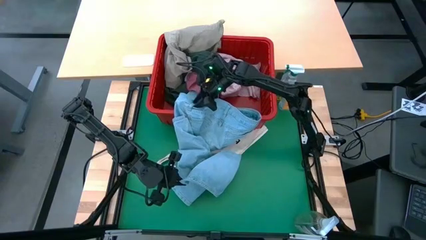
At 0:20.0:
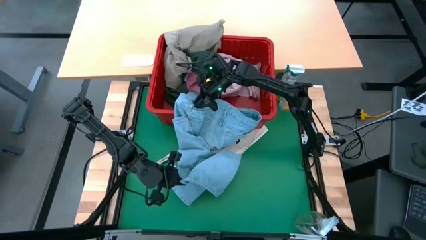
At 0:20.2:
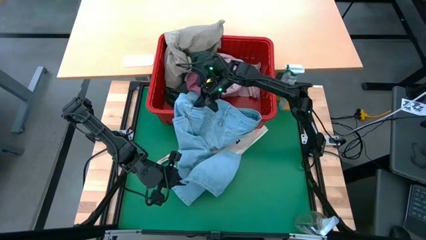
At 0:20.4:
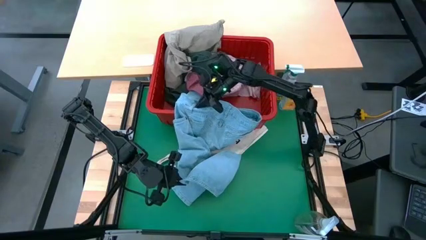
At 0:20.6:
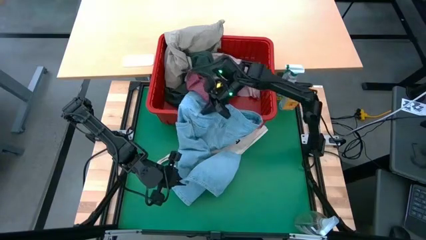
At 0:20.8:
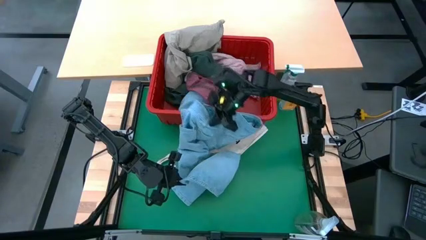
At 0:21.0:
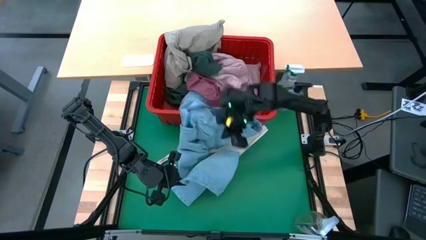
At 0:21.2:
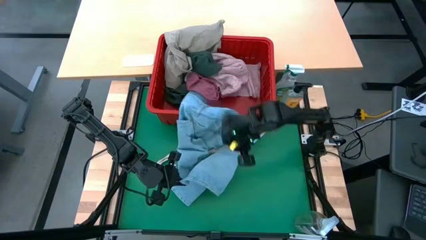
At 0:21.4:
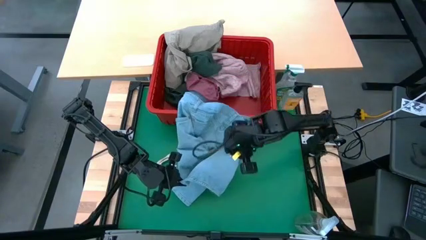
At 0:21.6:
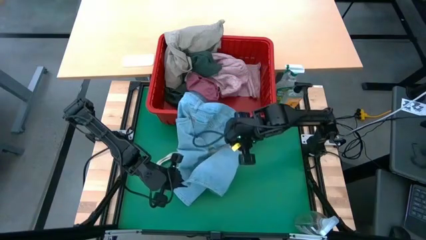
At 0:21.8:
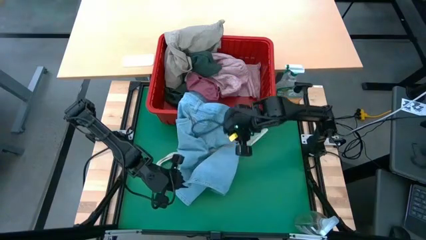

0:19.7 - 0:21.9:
Task: Fold laundry
Fold the blue jeans

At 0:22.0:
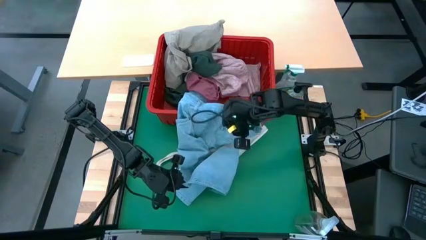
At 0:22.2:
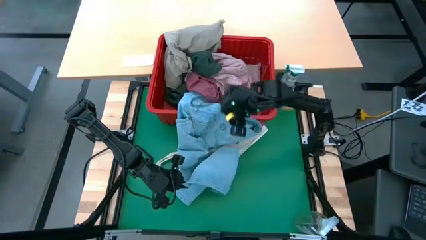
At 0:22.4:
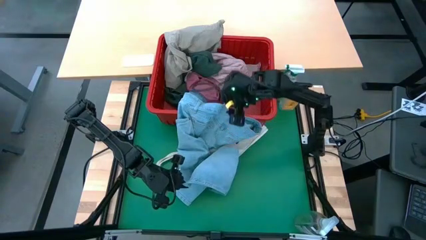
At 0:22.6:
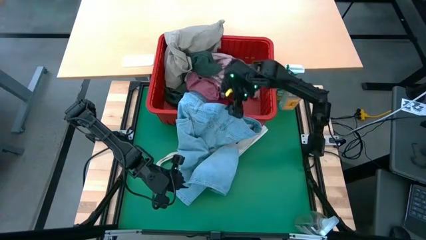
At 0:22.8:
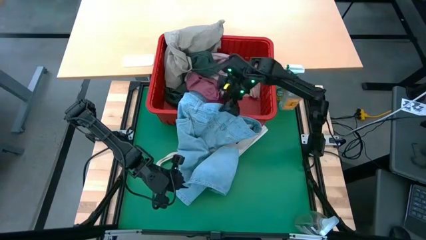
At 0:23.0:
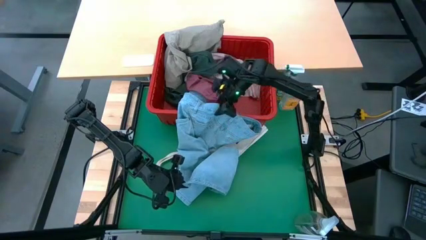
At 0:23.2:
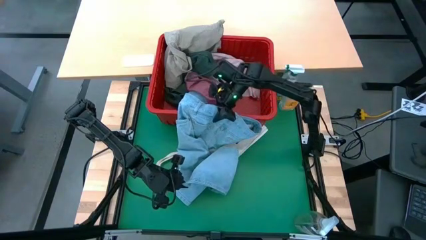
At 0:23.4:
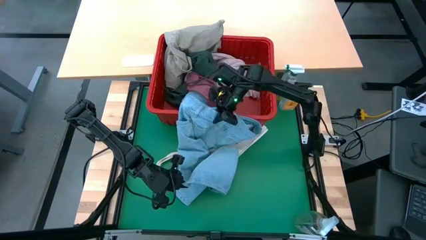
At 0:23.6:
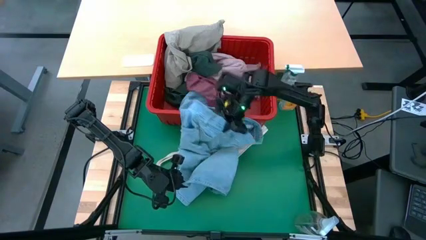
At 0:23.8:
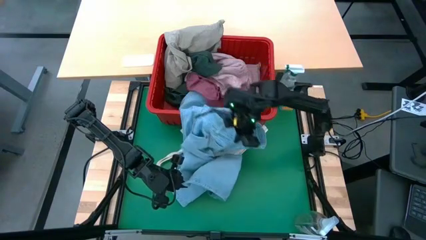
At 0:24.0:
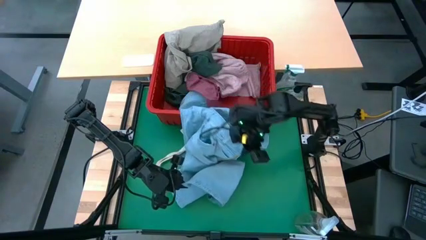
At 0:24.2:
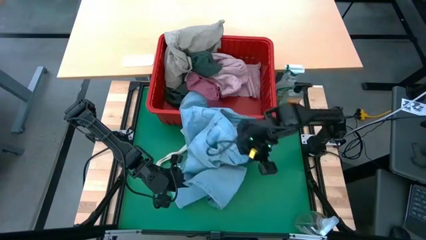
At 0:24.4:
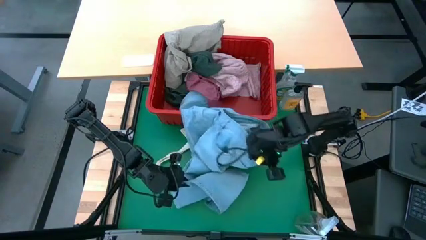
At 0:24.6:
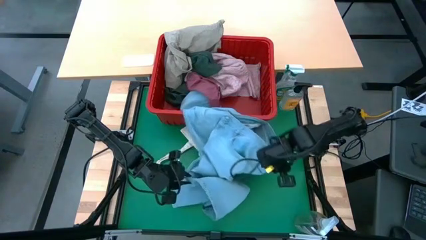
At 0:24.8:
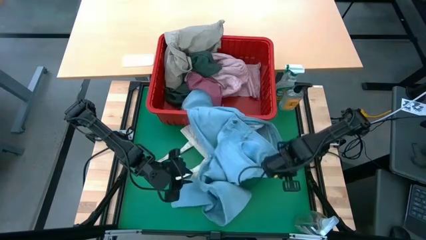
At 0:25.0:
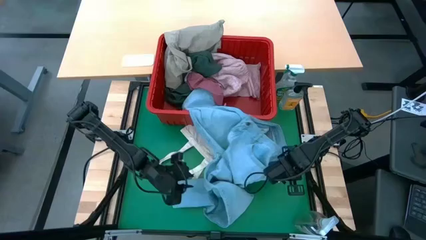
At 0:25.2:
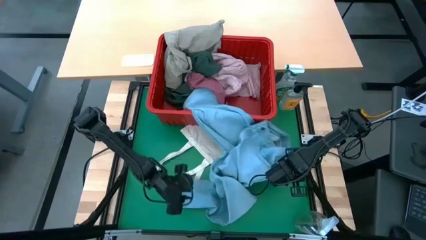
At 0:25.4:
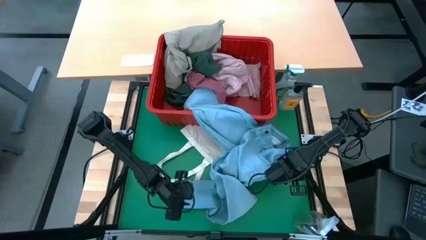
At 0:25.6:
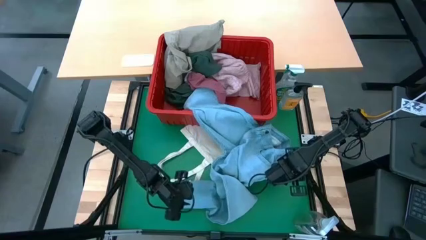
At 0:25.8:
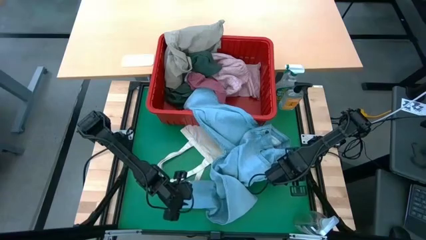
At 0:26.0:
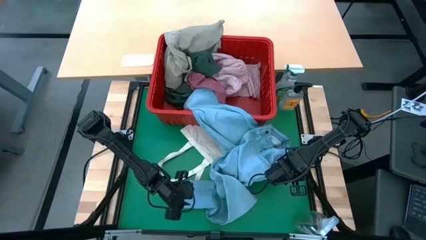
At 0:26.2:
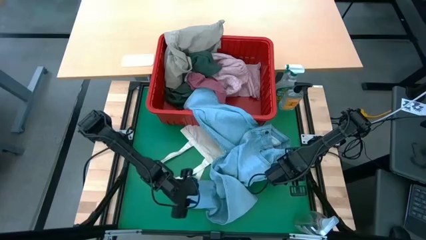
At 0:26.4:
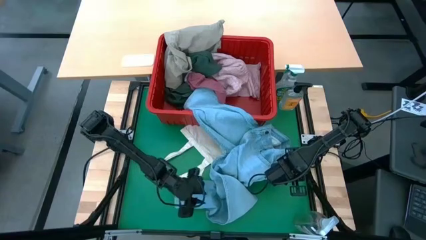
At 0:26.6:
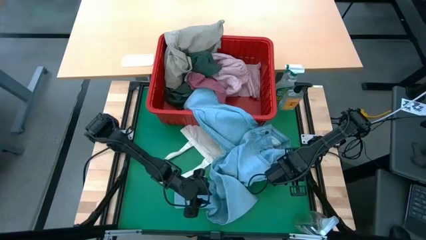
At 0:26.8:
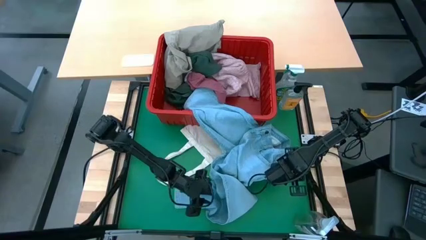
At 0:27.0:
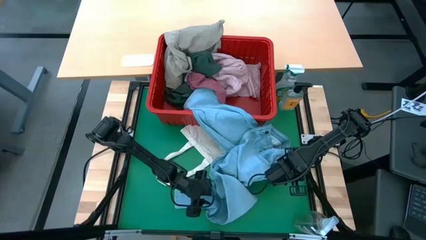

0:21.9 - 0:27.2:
Fold the blue jeans

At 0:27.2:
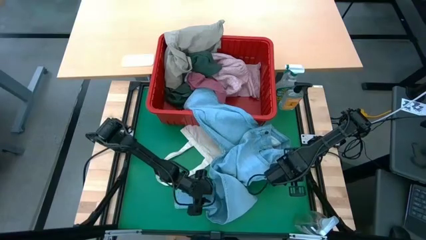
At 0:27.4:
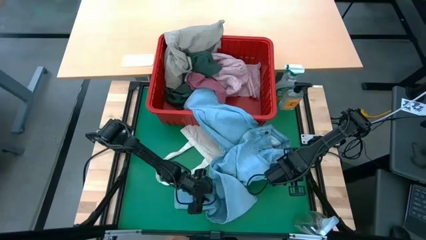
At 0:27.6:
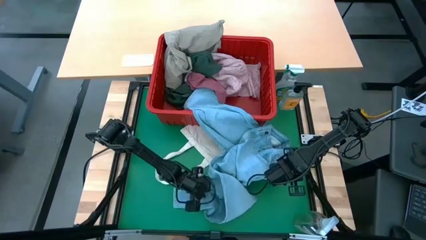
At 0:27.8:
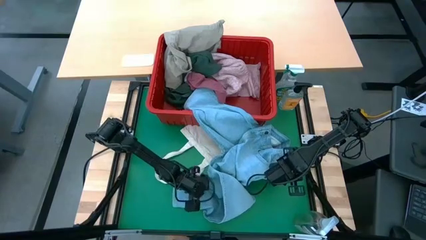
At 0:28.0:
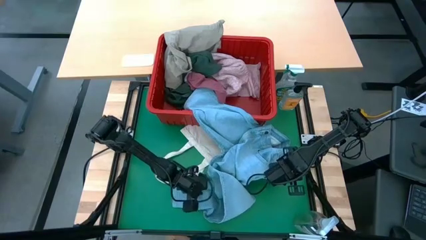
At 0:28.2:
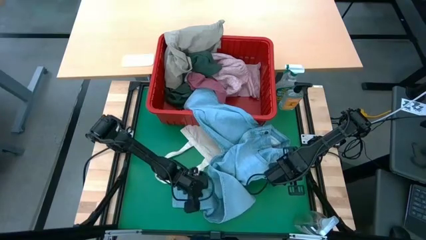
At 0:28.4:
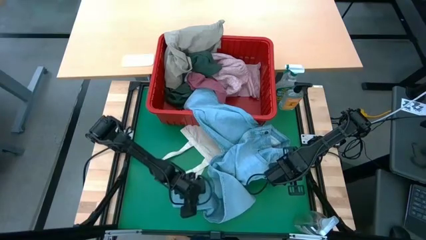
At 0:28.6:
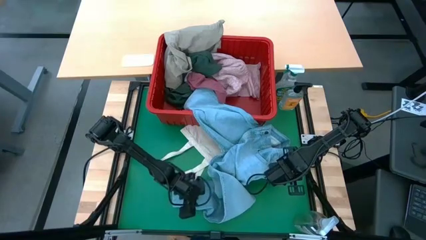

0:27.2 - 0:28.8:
Fold the blue jeans

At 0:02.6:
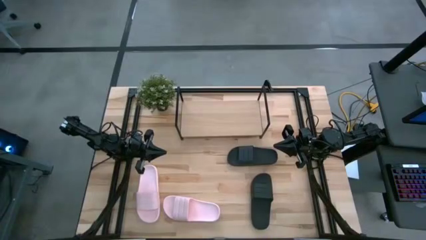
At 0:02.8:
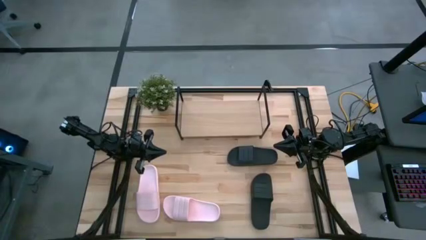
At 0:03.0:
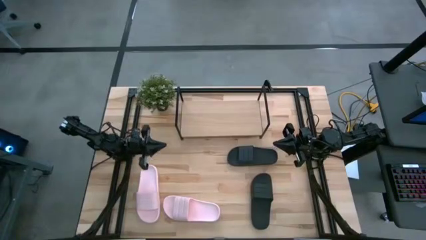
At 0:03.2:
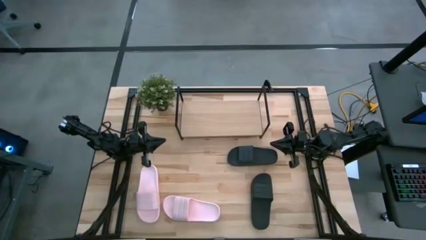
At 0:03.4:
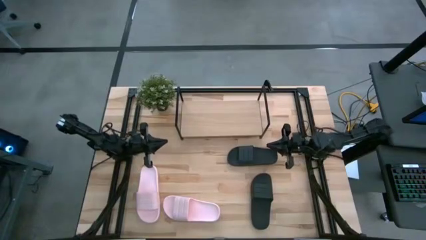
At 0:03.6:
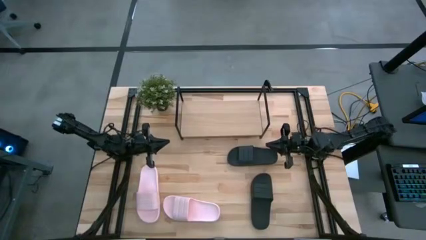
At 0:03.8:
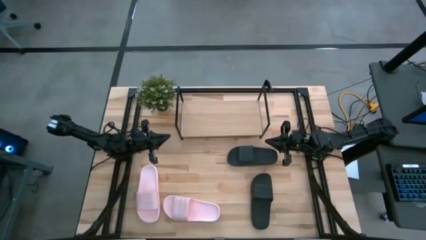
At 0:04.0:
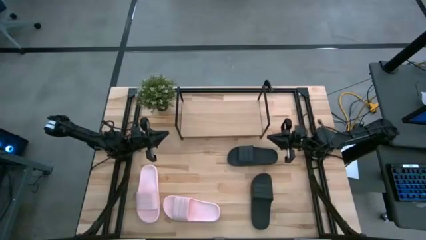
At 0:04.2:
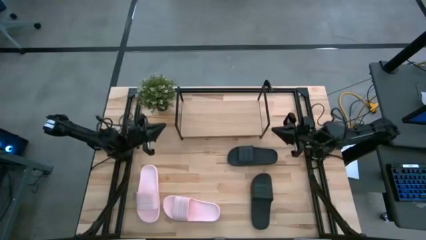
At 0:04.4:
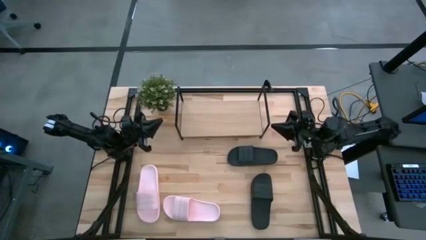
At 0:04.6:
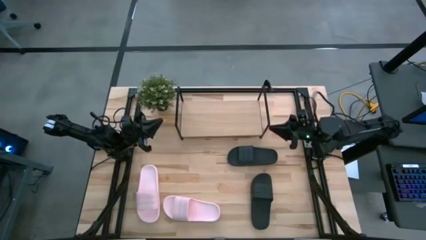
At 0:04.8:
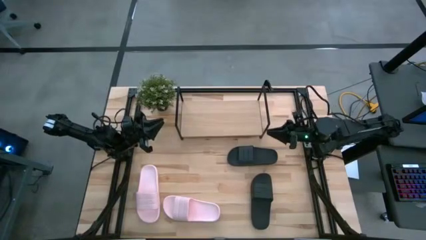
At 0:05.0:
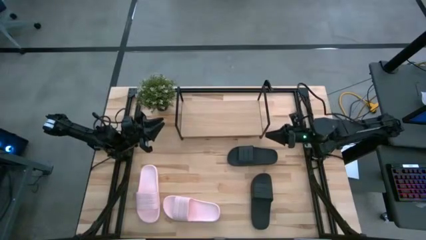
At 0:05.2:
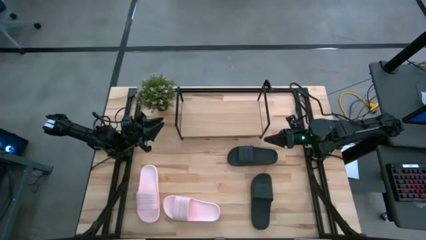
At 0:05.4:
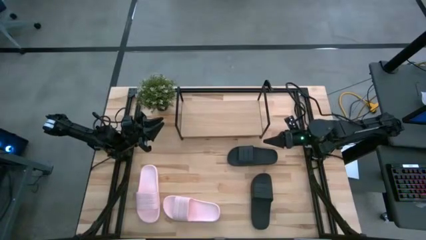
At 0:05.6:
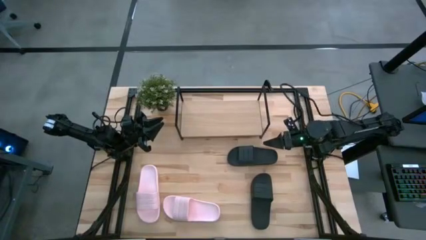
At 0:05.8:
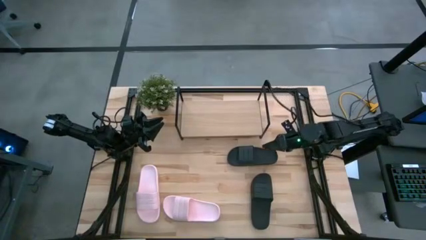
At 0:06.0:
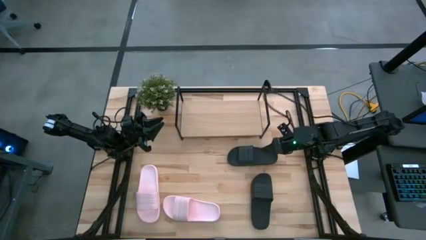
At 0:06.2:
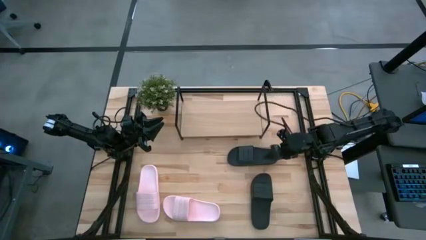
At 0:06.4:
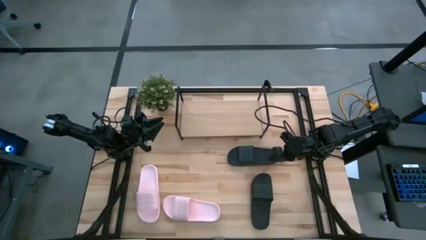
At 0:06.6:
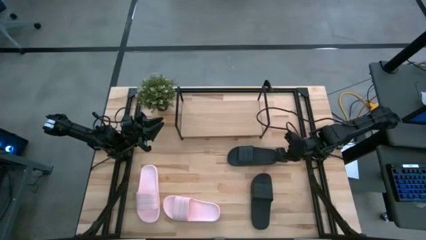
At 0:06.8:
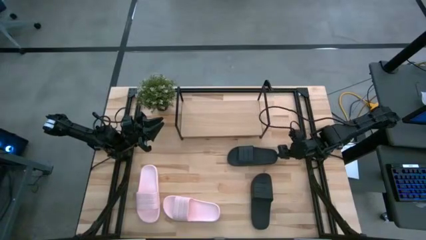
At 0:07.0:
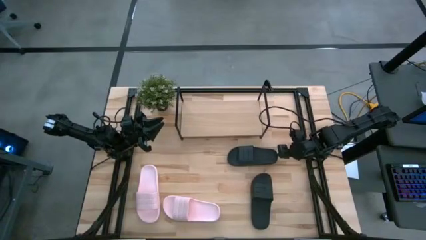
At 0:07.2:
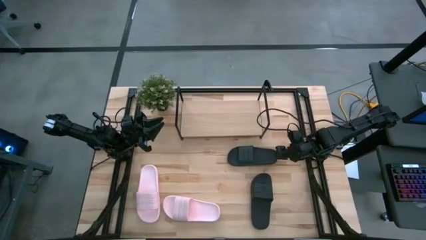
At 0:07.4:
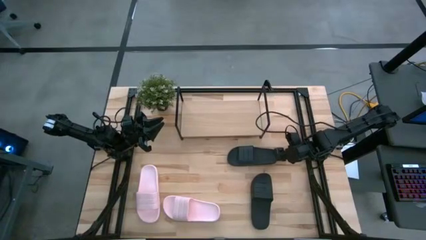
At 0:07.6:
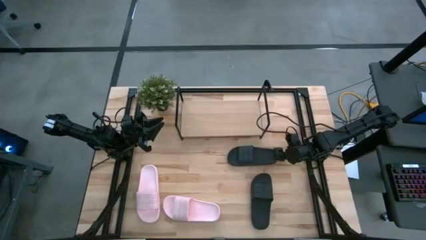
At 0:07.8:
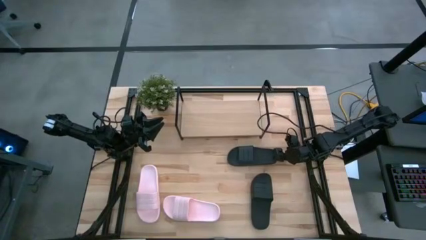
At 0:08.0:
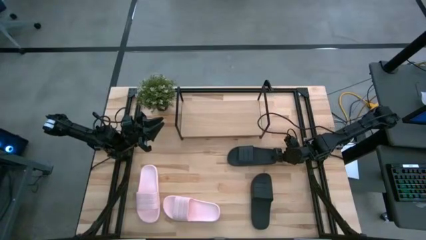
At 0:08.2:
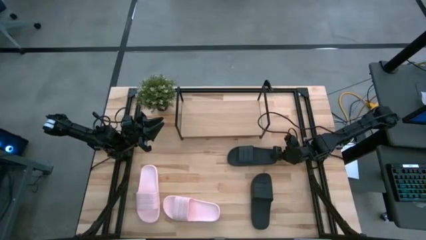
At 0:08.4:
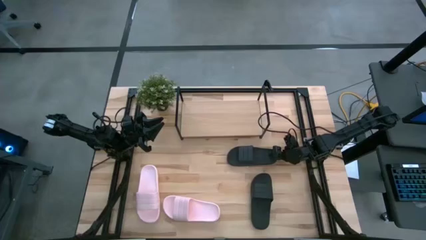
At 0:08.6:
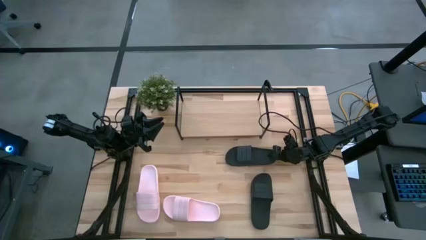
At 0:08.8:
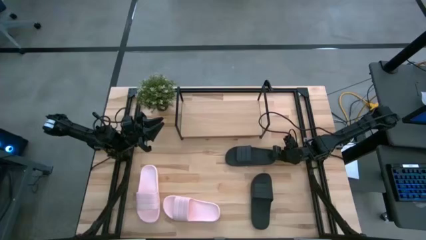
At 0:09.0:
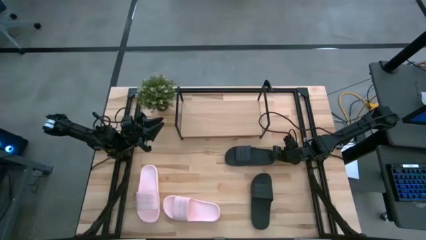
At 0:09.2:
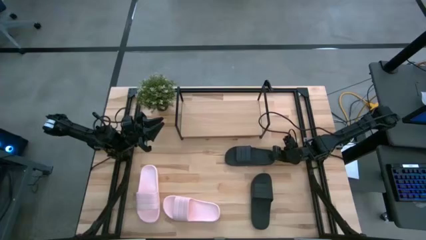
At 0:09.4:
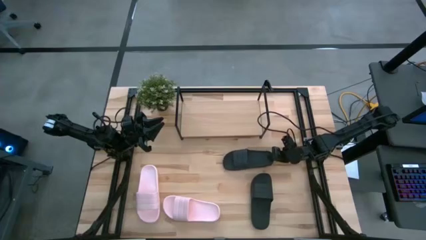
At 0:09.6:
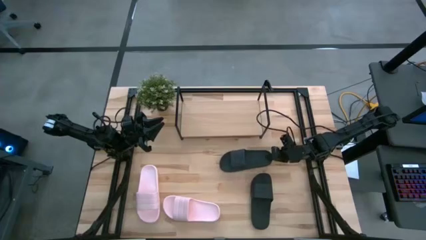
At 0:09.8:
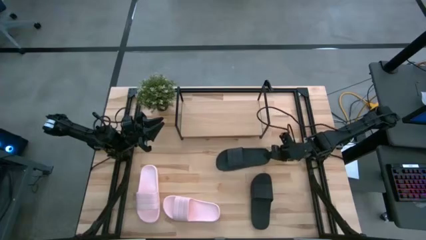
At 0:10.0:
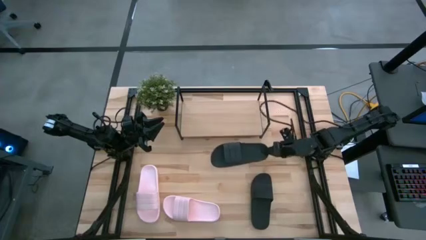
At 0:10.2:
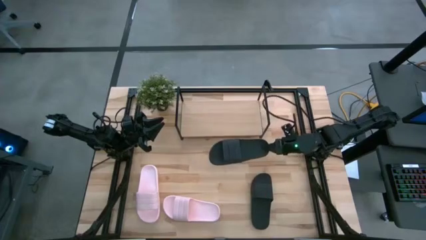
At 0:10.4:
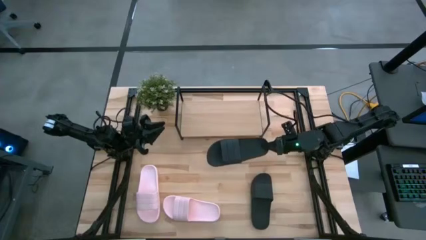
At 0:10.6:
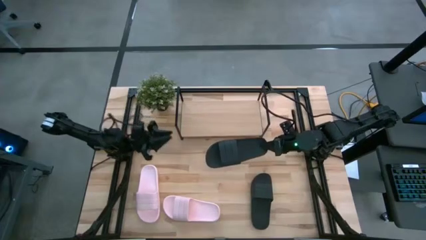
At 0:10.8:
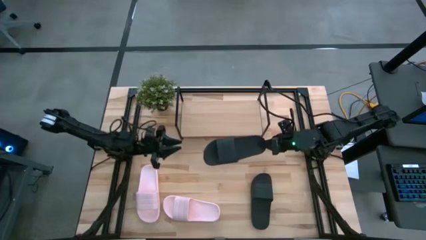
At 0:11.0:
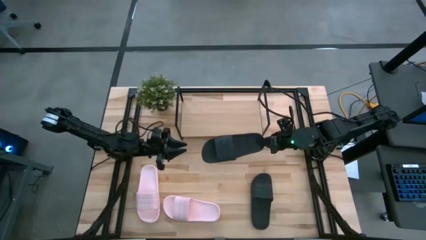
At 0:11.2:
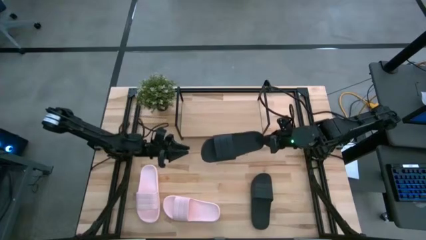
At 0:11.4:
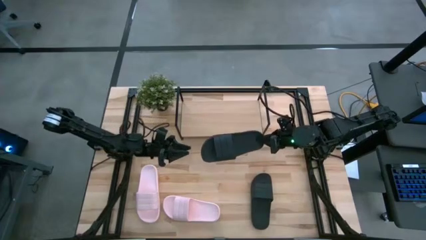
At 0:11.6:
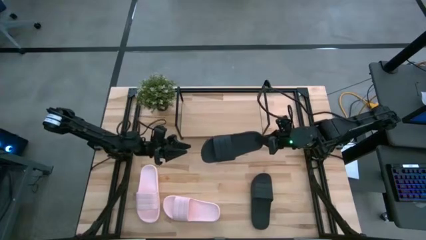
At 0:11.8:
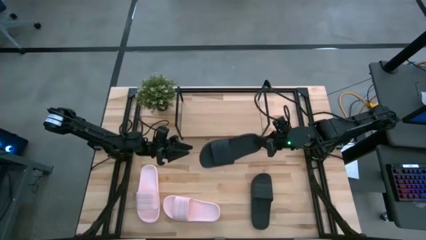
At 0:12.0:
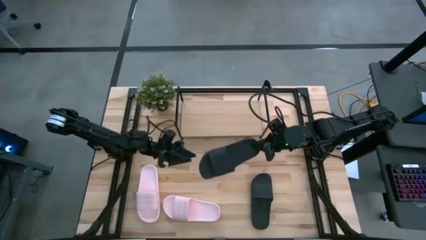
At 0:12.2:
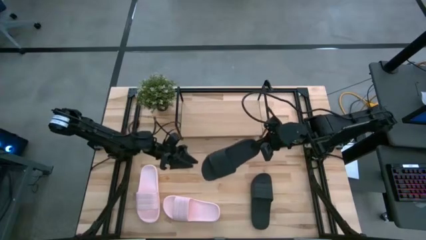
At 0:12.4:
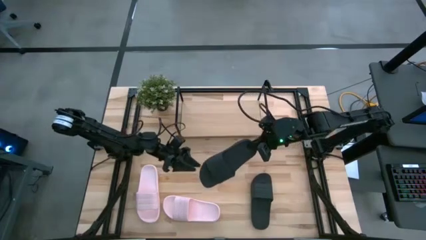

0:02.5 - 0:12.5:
Task: Pick and place slides into the shelf
Put the top black slipper on the shelf
